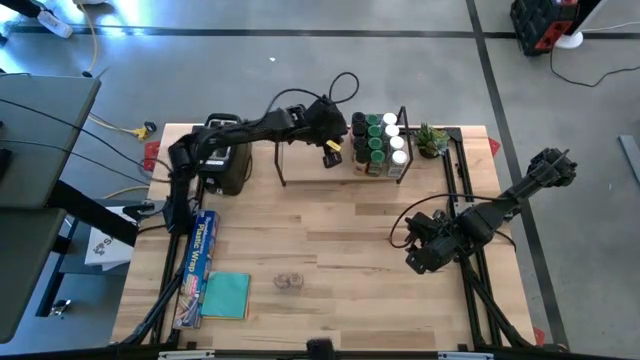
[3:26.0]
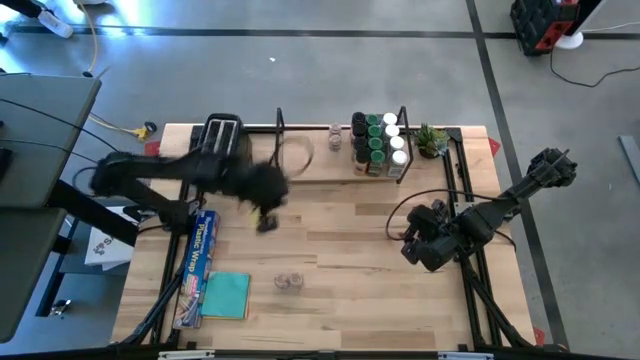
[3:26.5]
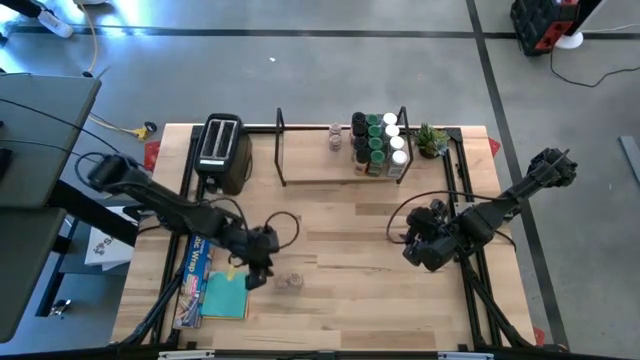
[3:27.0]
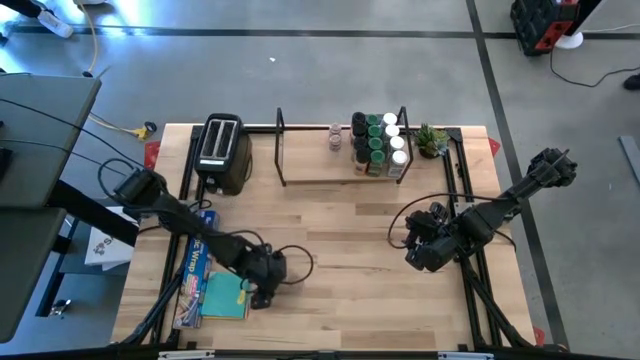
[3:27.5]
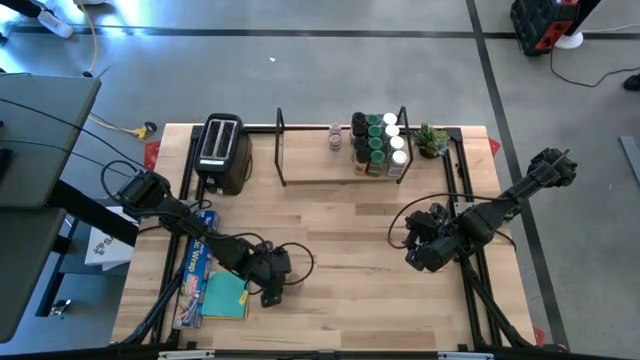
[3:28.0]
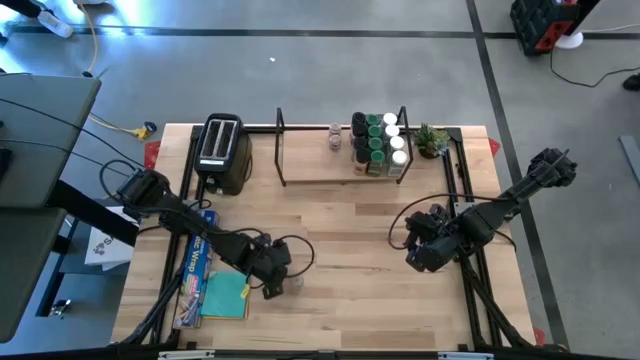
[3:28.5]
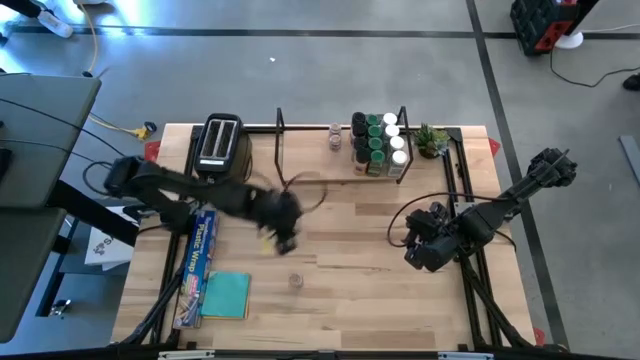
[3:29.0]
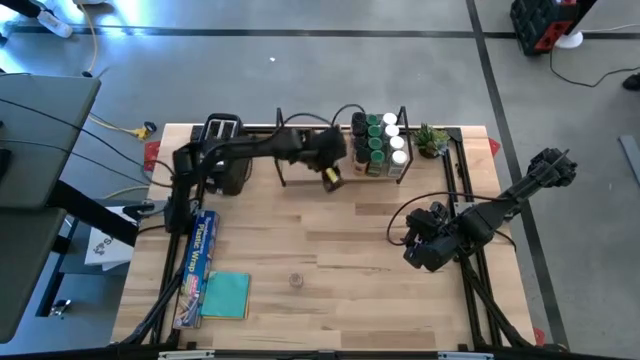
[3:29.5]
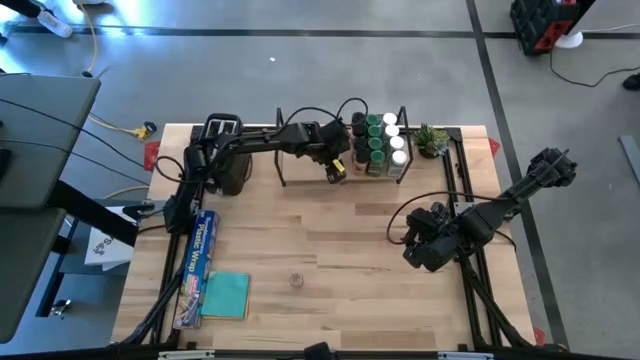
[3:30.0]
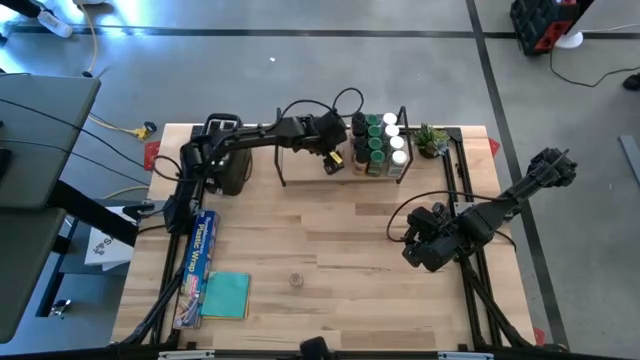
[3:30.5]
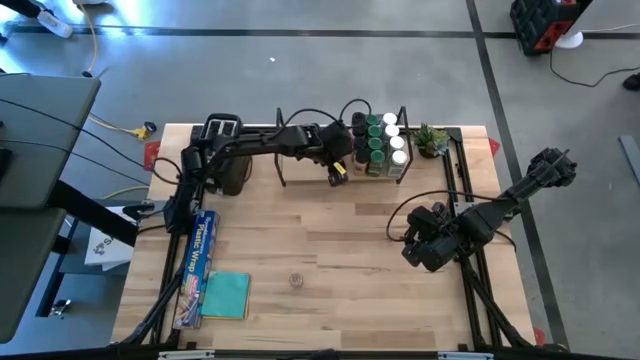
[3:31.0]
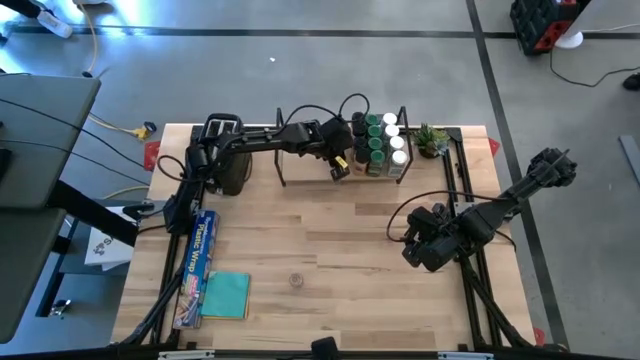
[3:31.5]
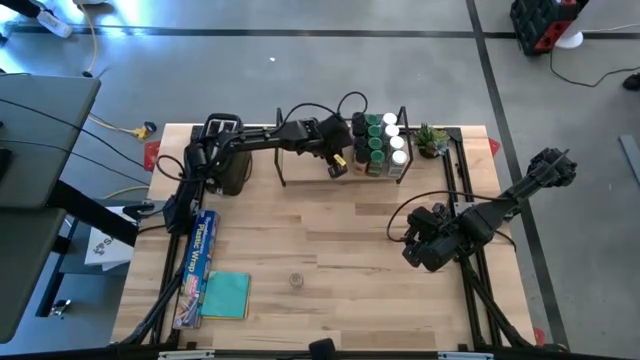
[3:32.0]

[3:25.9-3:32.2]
Task: Shelf spices
Put the brown seasoning bottle on the shelf and align it with the other brown seasoning bottles

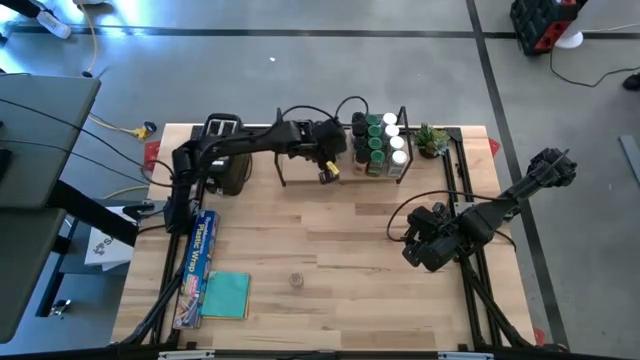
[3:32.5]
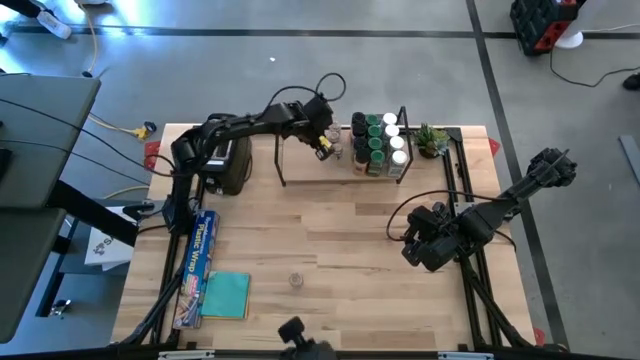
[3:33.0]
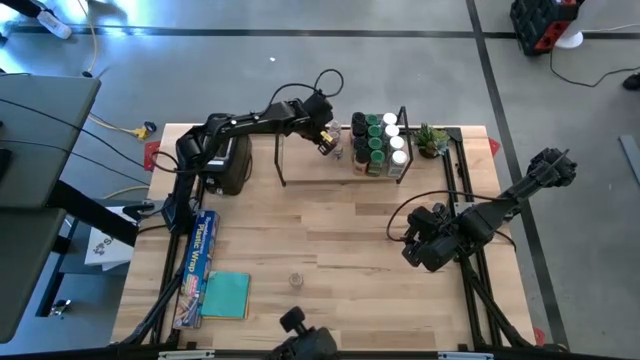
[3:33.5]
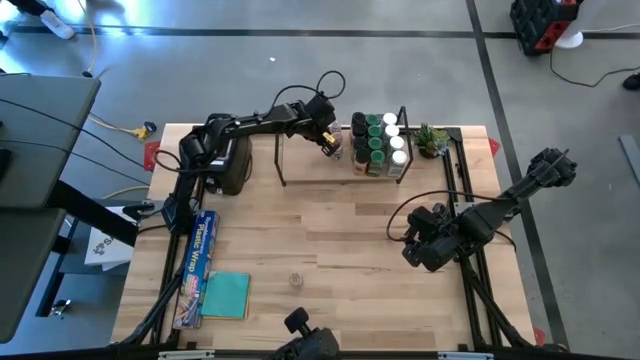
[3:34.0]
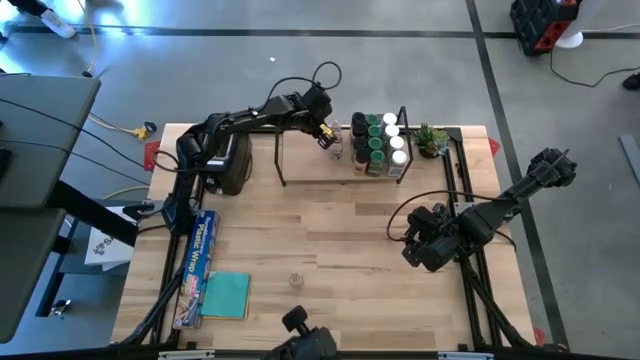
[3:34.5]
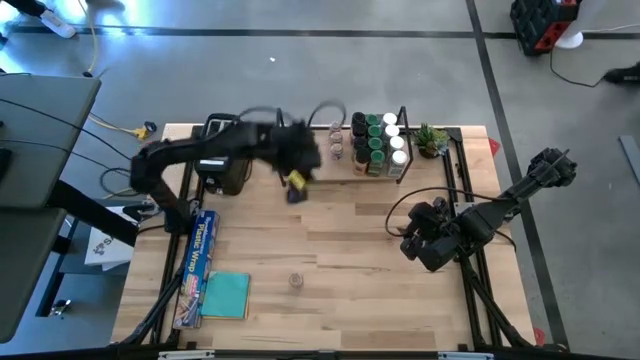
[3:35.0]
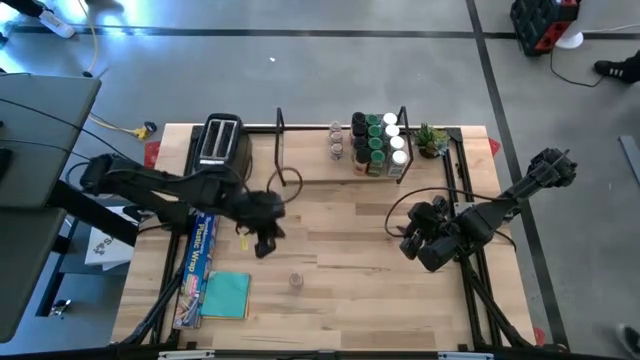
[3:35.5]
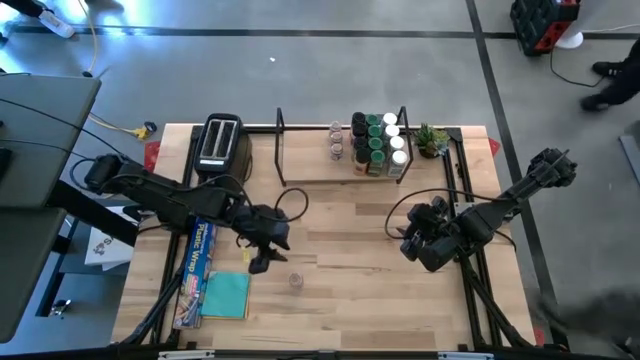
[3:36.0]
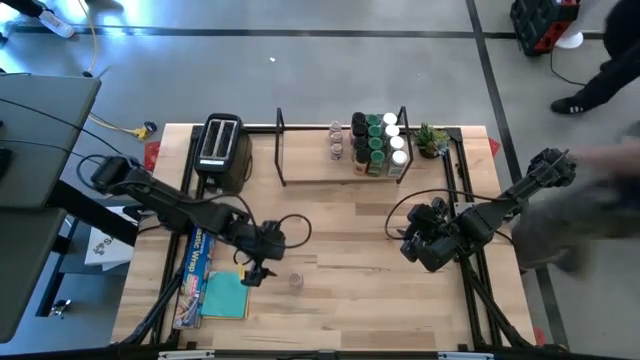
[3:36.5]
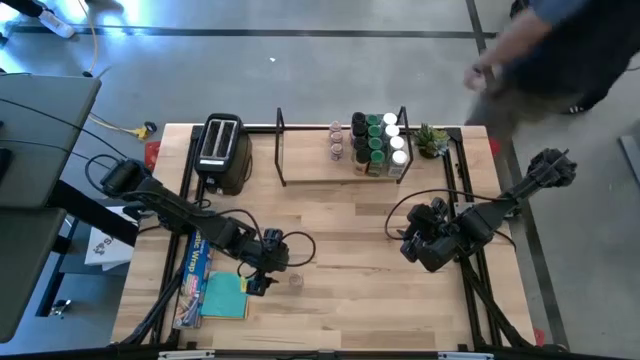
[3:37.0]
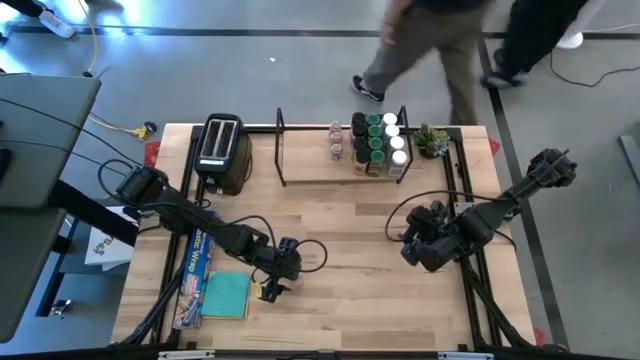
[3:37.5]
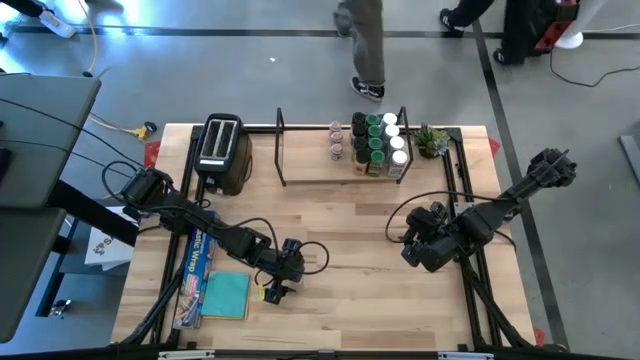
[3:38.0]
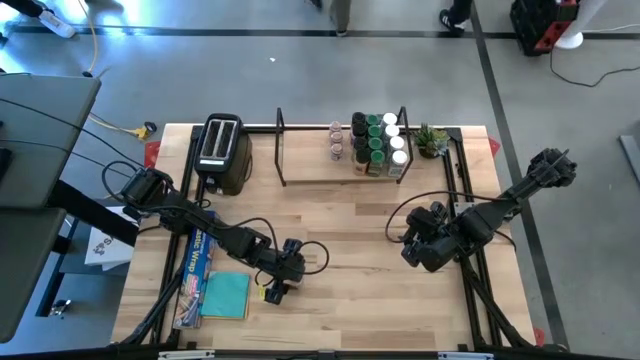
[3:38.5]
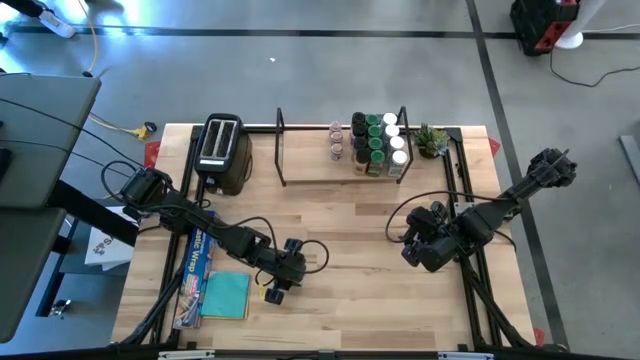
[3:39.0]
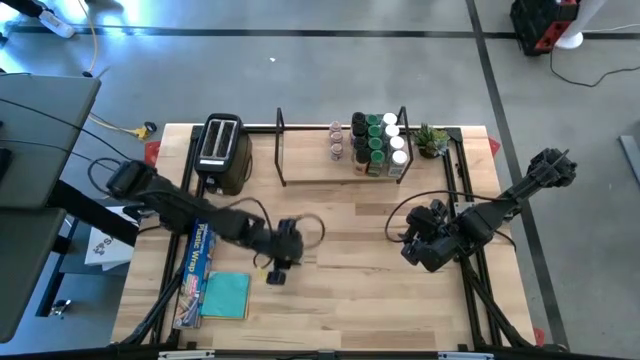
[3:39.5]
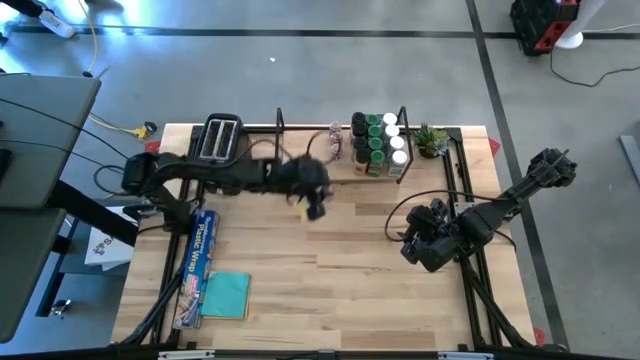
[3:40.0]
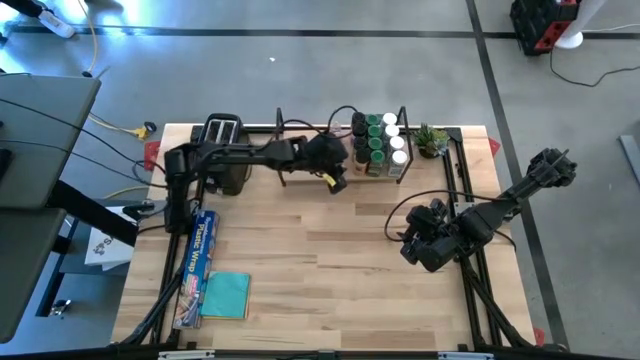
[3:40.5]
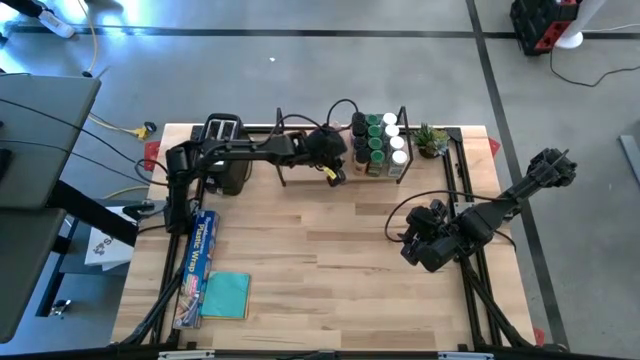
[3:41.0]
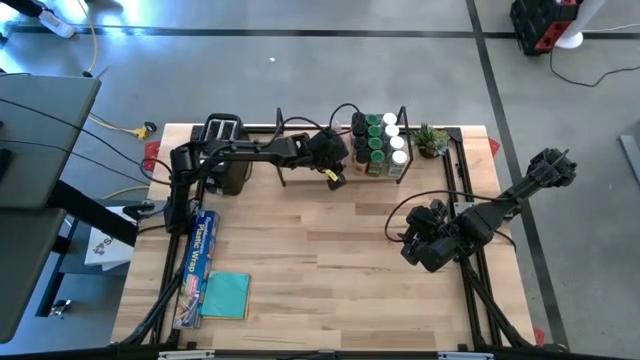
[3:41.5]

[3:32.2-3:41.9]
Put the brown seasoning bottle on the shelf and align it with the other brown seasoning bottles

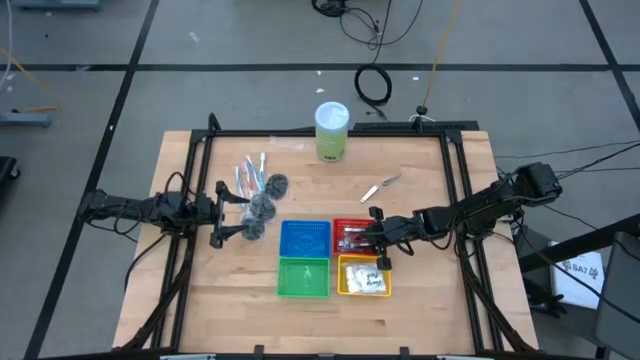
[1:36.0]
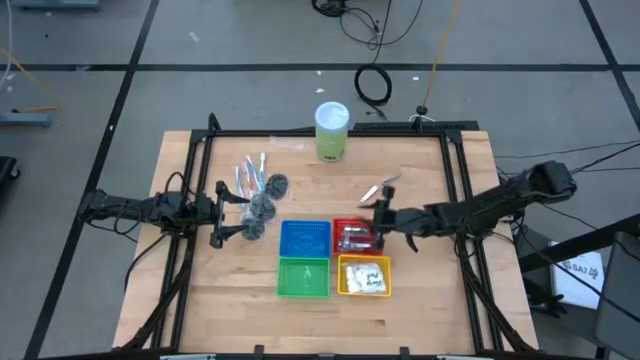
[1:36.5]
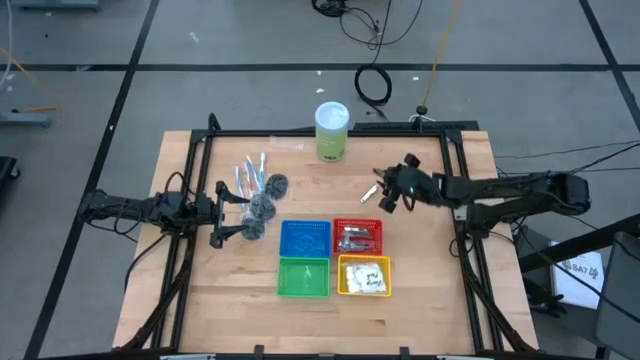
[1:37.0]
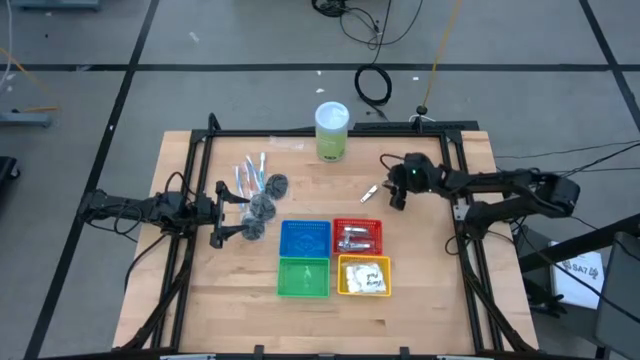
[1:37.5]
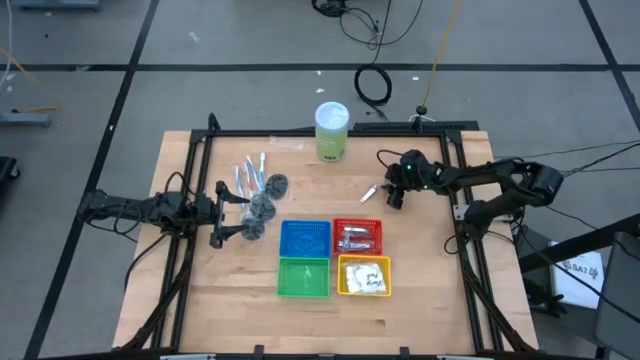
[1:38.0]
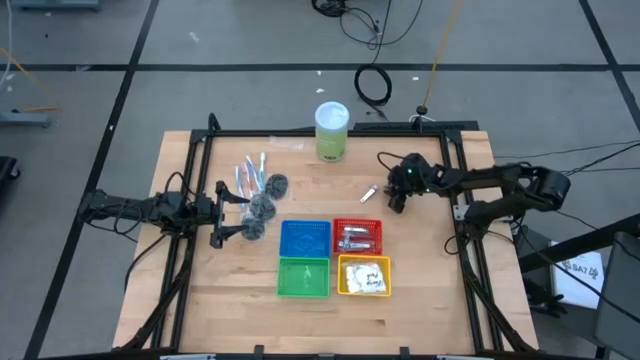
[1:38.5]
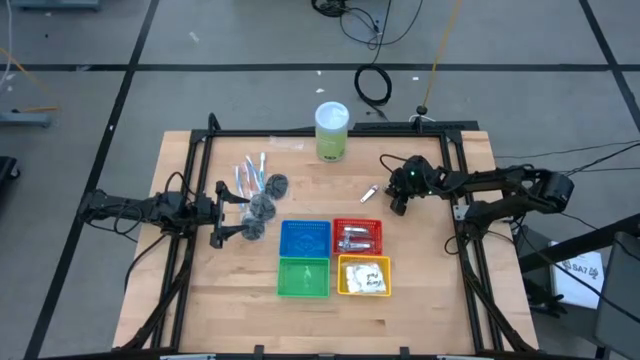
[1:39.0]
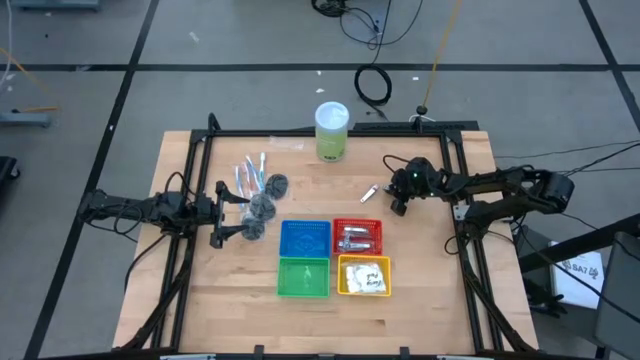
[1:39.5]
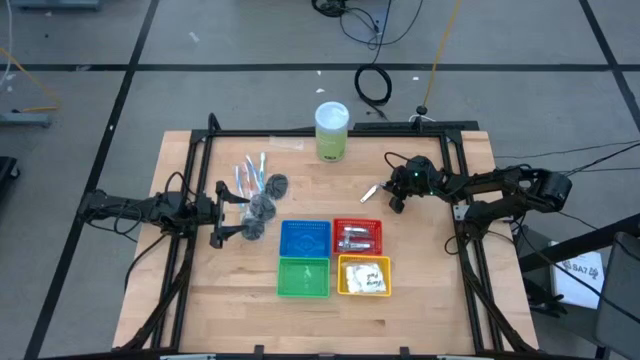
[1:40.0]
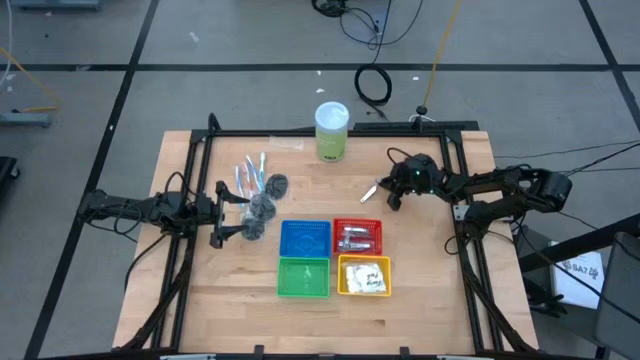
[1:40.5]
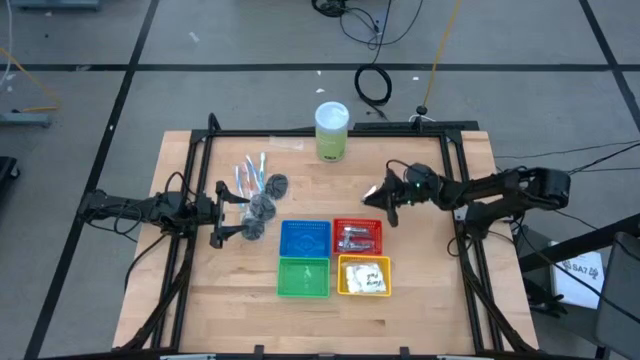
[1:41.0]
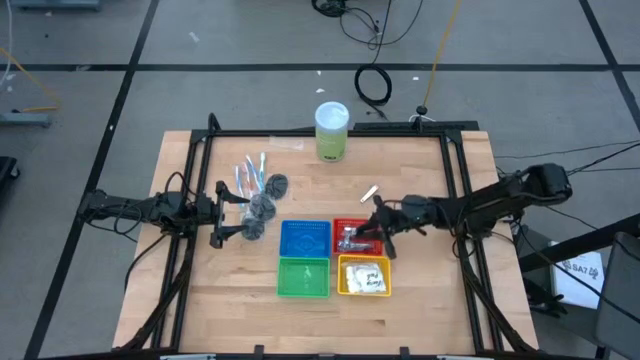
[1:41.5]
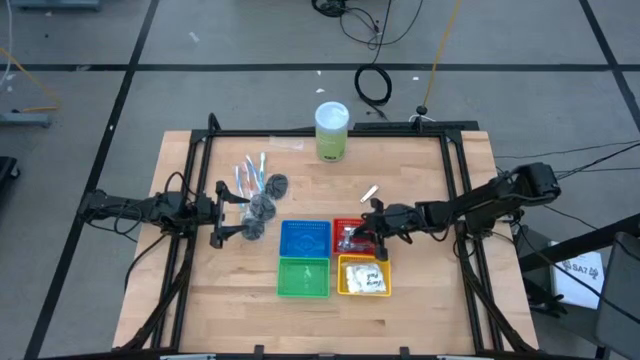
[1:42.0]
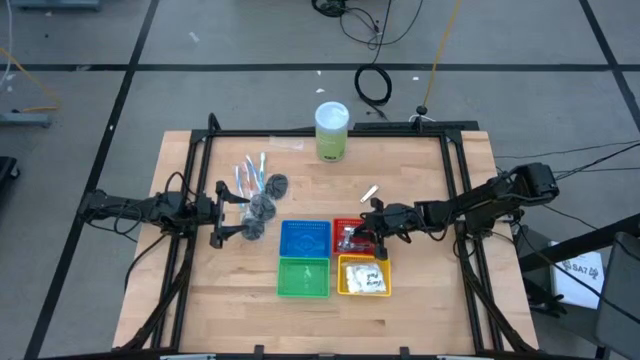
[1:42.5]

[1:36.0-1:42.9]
Task: Pick & Place Travel size toiletries
Put the nail cutter into the red basket
